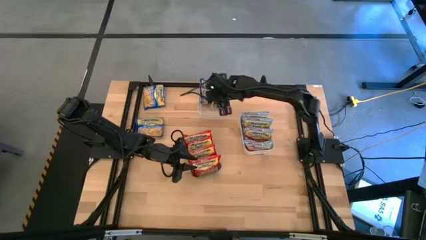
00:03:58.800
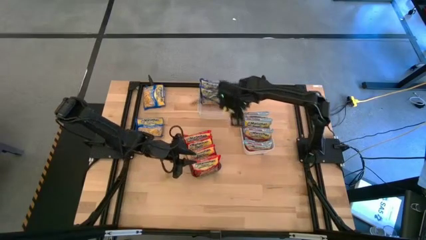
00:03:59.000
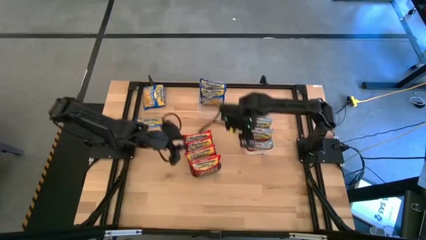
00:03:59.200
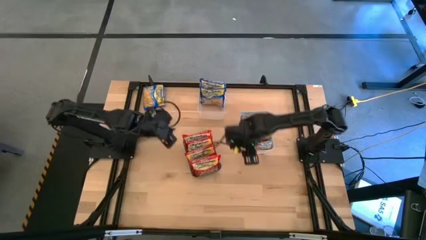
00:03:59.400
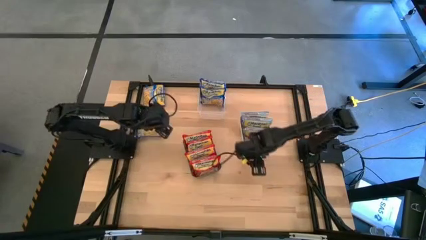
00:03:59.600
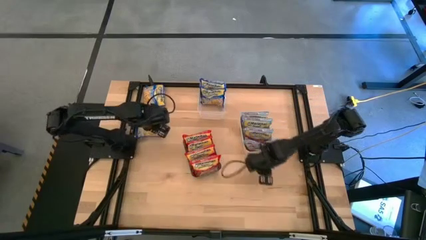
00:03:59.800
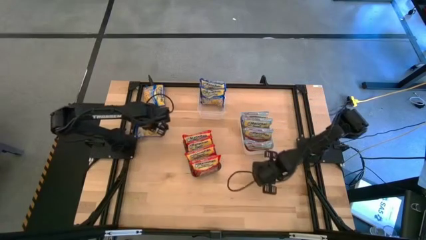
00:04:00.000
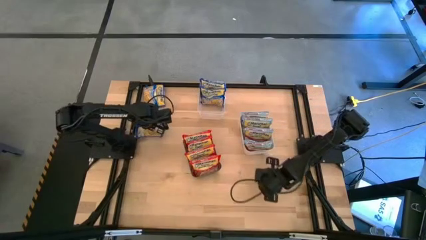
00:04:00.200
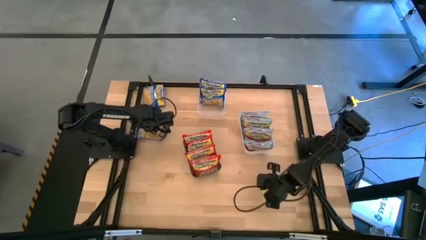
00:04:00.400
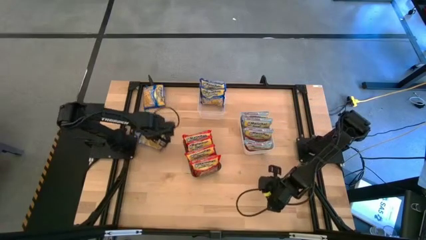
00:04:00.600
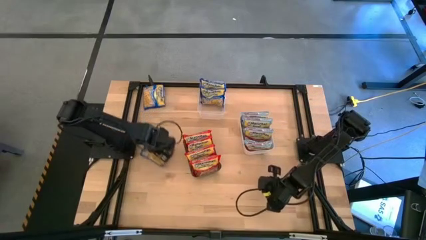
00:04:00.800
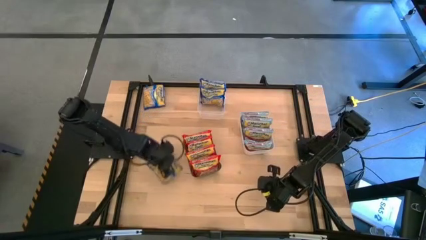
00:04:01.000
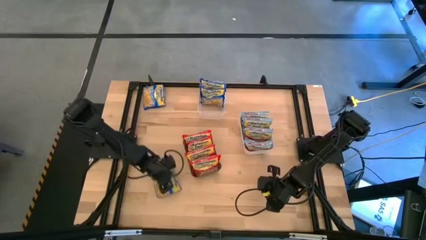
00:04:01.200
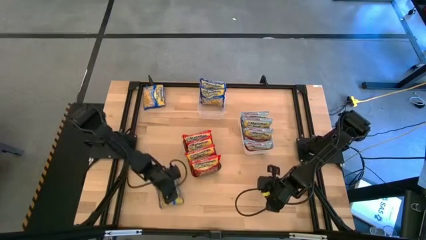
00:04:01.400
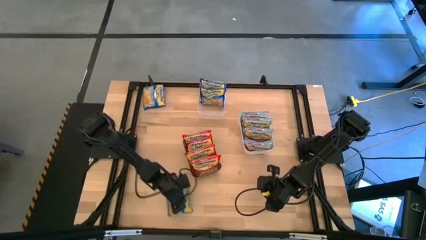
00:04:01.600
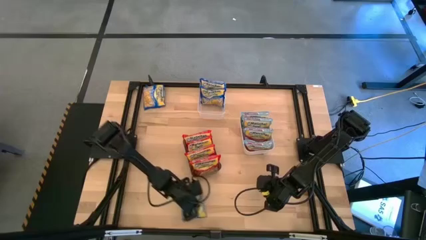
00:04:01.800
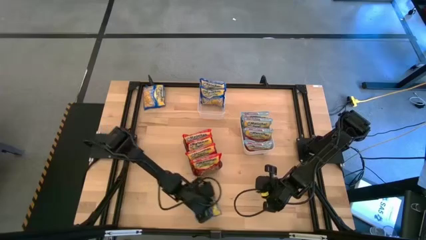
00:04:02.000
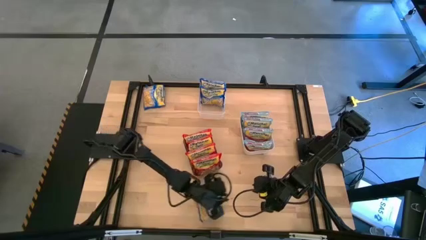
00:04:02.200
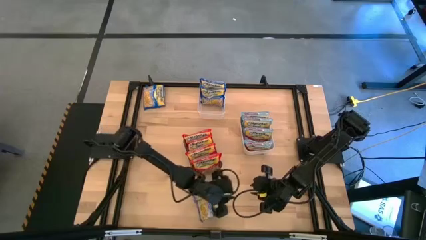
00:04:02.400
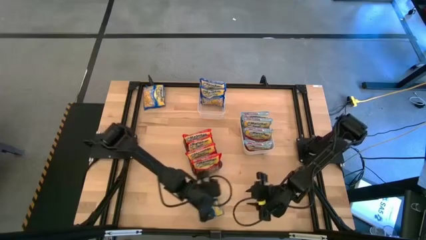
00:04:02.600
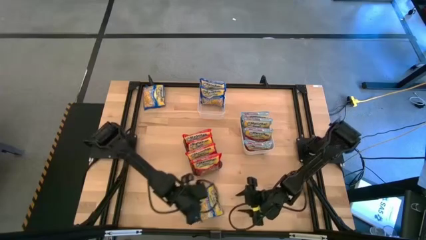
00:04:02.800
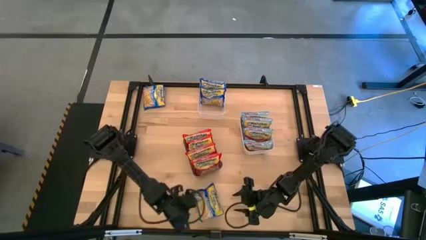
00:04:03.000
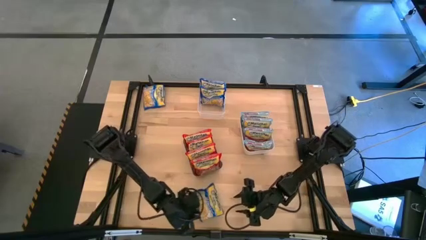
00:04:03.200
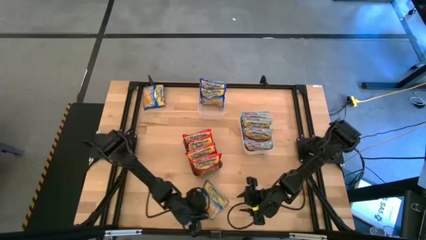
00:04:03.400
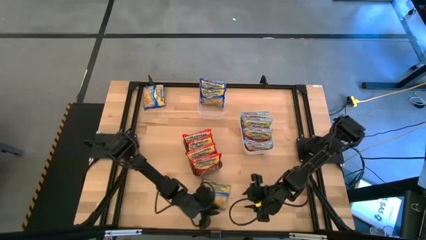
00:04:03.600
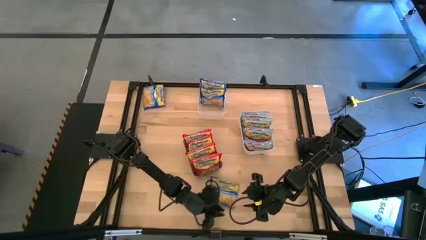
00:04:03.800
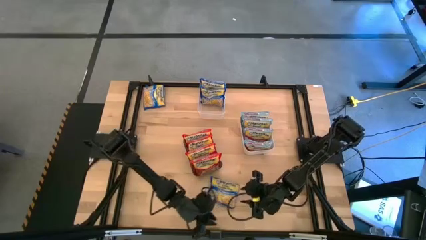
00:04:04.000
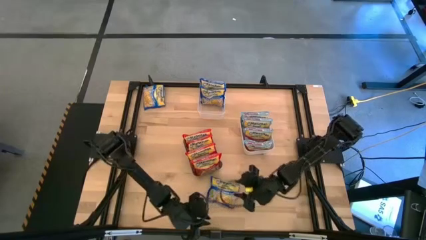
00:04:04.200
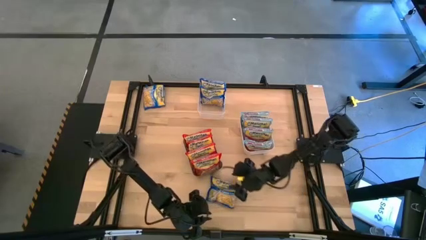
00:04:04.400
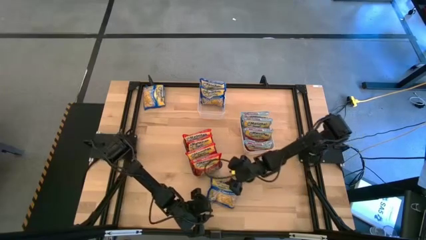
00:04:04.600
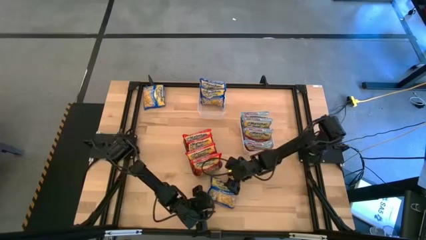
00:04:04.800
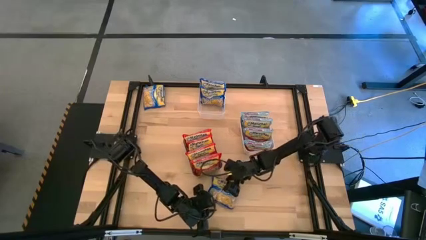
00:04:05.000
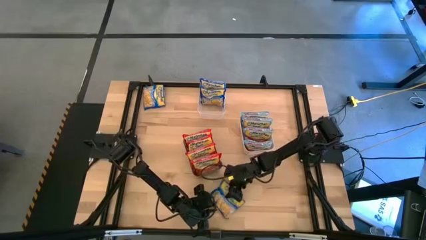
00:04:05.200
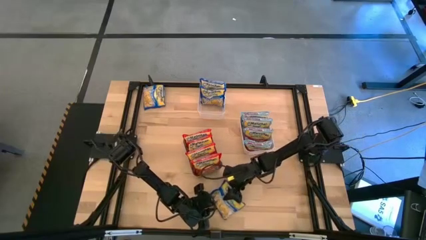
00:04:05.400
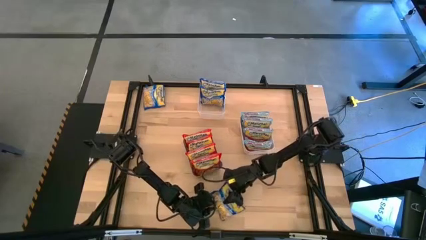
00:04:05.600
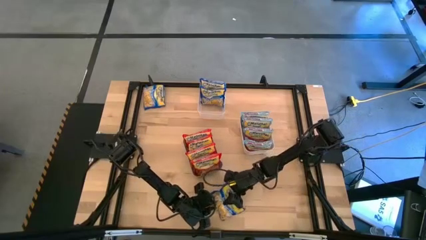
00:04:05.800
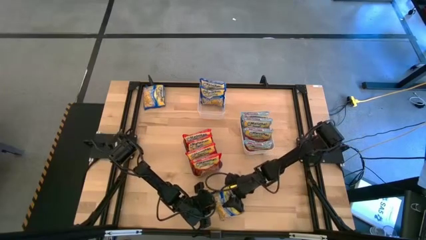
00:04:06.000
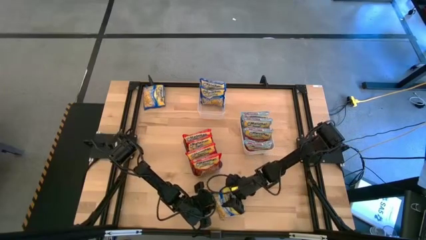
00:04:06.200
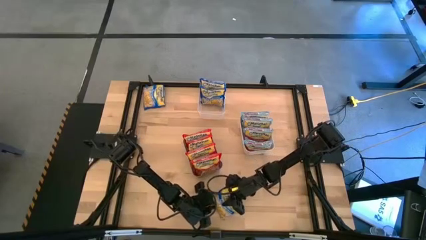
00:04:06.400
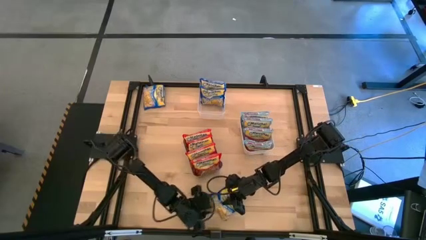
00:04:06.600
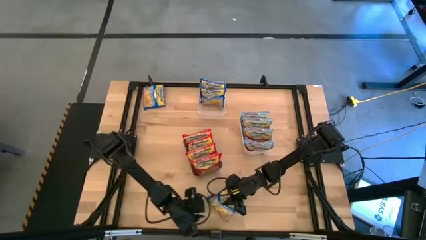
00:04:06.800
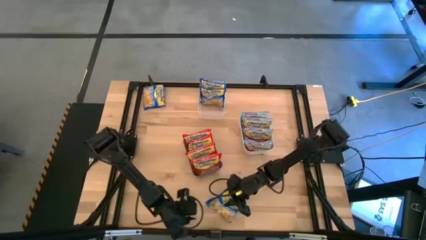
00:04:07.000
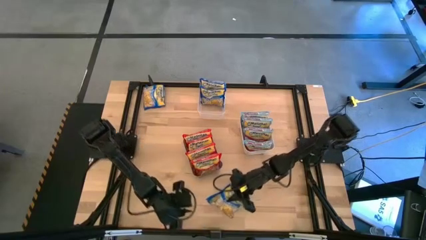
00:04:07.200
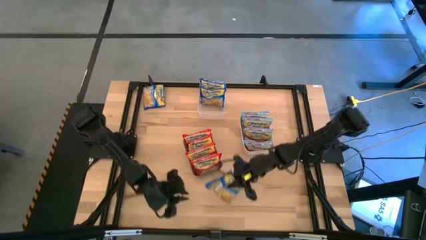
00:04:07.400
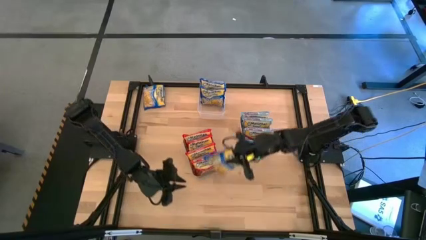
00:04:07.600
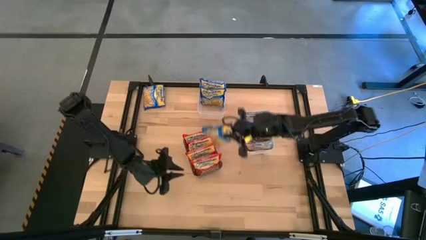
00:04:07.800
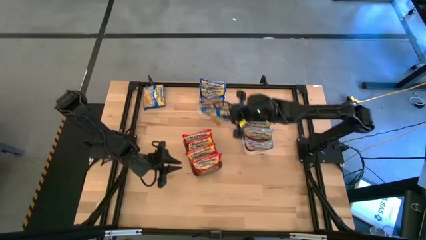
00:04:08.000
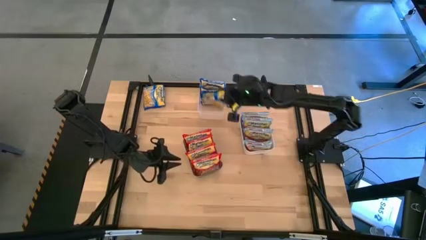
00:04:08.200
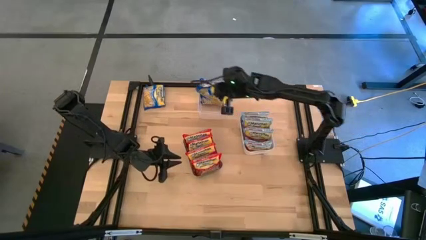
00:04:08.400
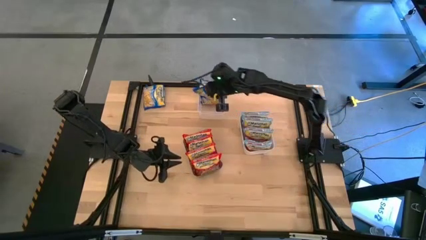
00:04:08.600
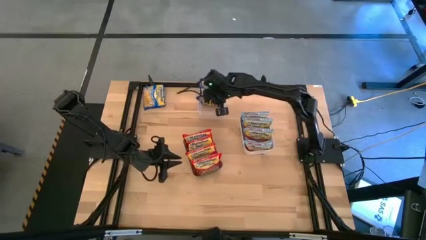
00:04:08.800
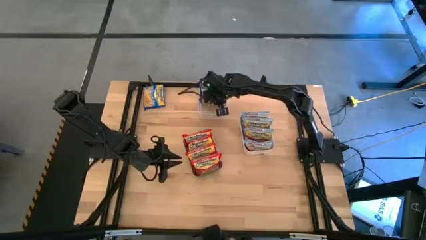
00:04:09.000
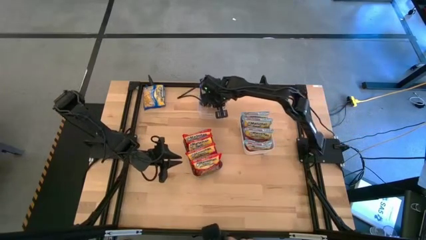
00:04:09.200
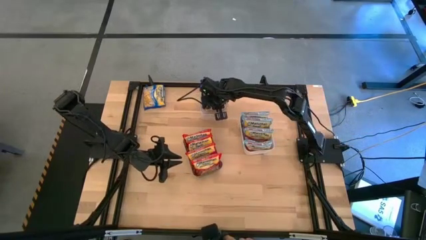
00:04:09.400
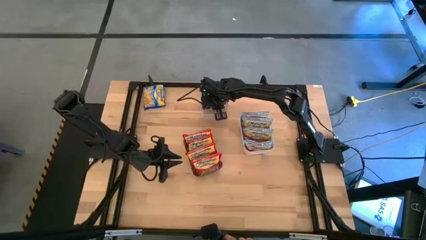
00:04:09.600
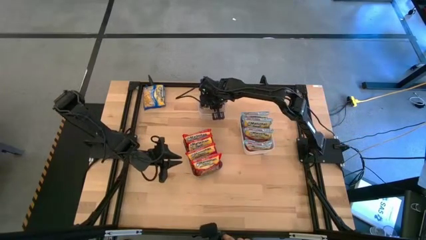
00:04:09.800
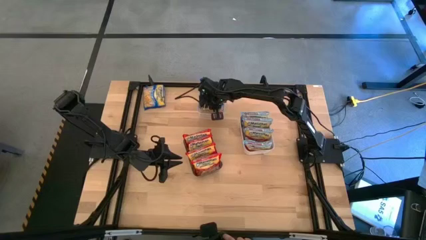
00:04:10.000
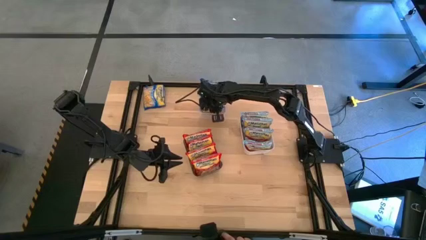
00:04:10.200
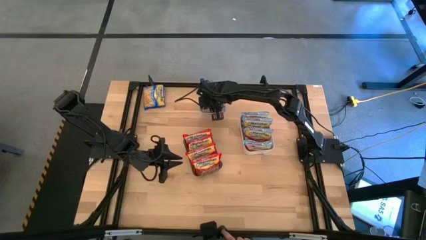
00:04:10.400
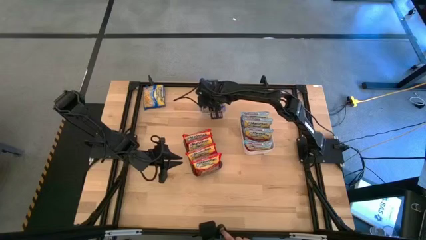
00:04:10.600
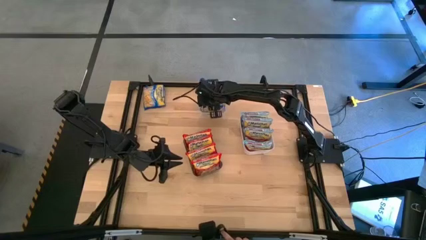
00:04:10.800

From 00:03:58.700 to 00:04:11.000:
Task: Sort Maruchan noodles
Put the blue noodle pack into the transparent bin

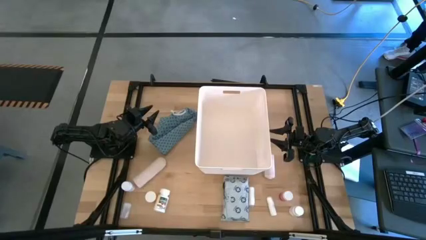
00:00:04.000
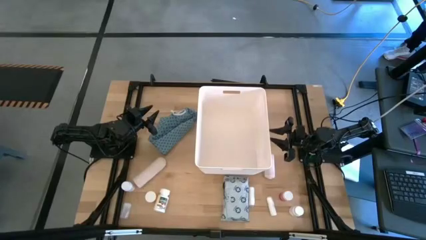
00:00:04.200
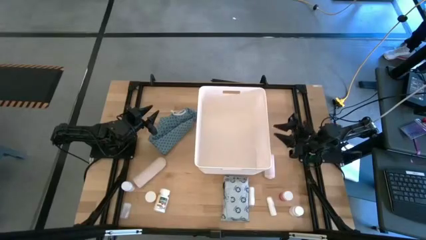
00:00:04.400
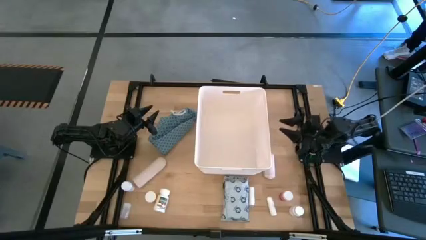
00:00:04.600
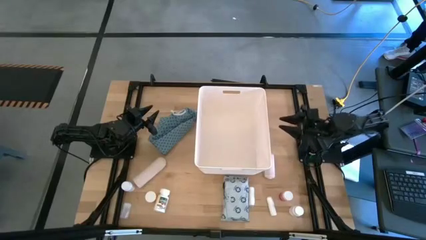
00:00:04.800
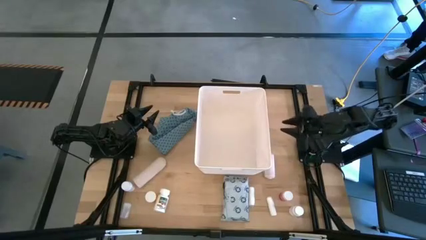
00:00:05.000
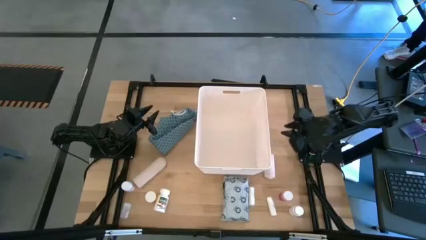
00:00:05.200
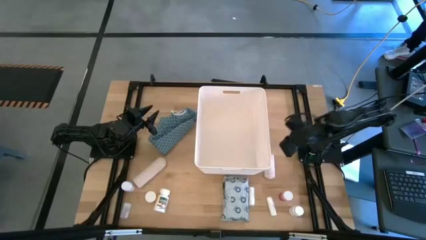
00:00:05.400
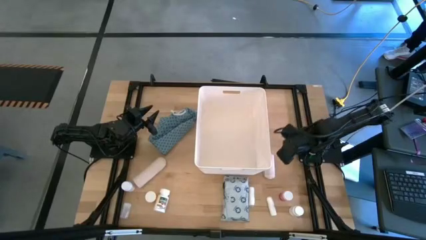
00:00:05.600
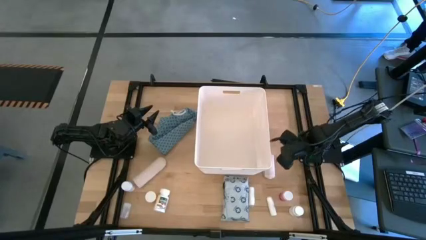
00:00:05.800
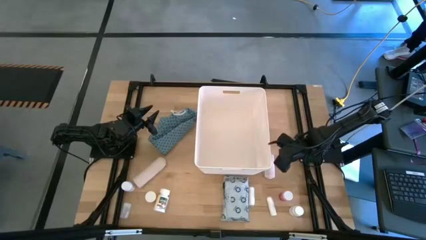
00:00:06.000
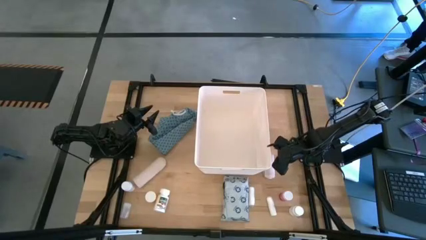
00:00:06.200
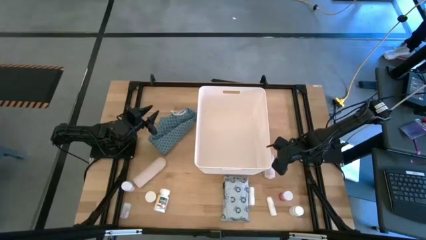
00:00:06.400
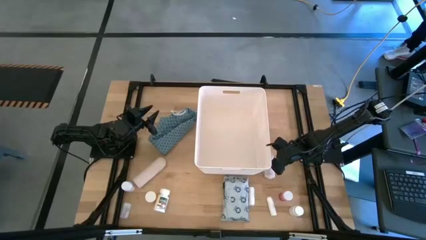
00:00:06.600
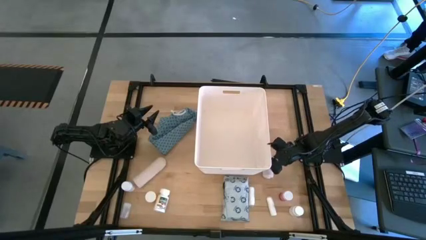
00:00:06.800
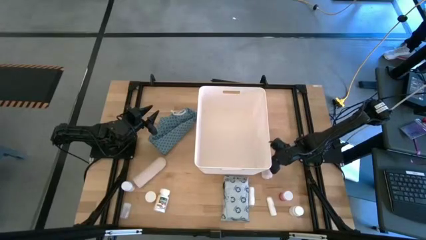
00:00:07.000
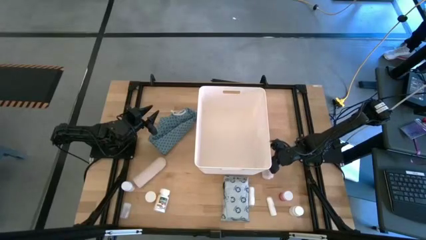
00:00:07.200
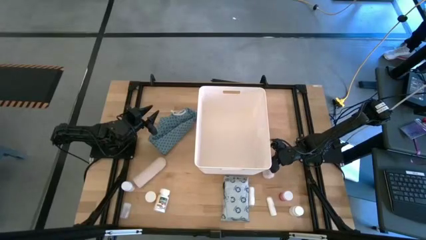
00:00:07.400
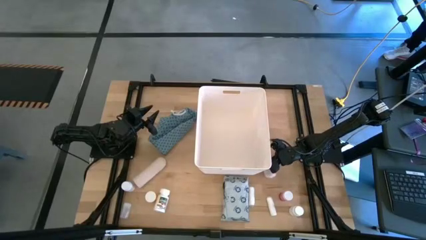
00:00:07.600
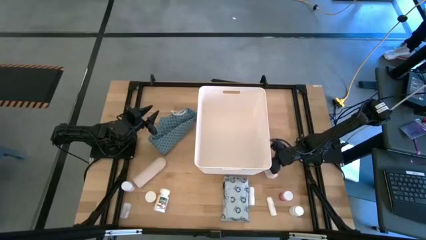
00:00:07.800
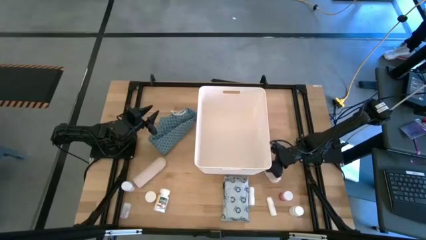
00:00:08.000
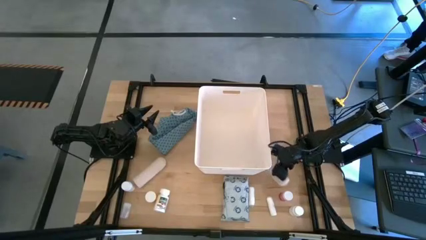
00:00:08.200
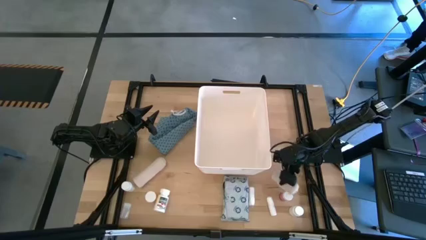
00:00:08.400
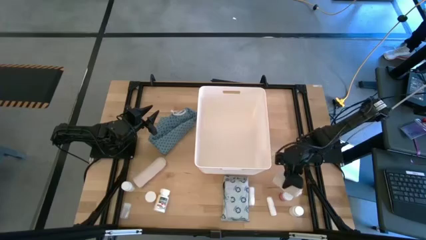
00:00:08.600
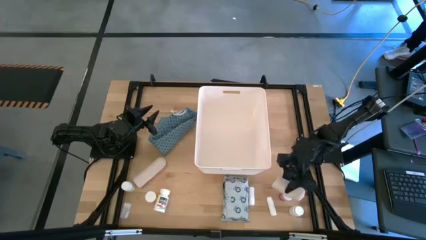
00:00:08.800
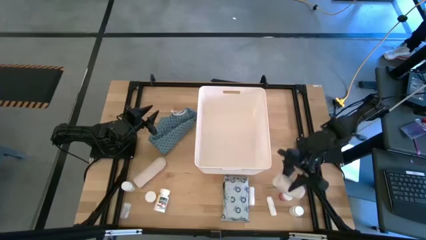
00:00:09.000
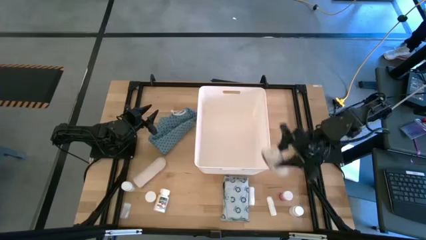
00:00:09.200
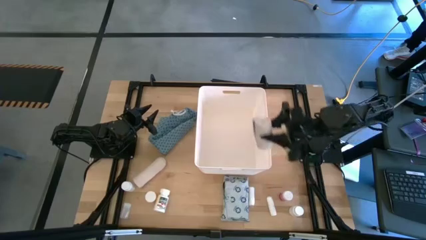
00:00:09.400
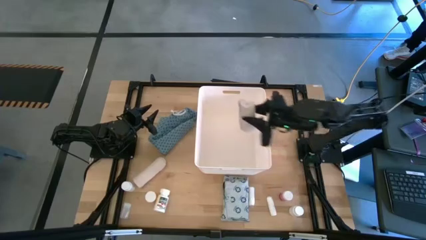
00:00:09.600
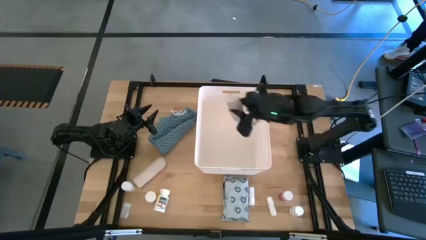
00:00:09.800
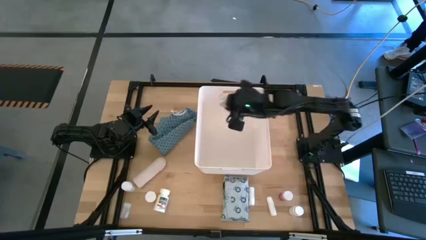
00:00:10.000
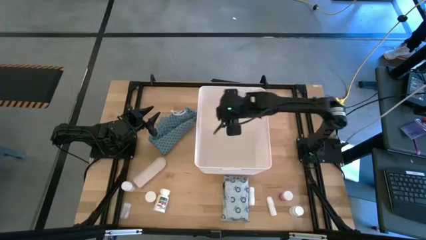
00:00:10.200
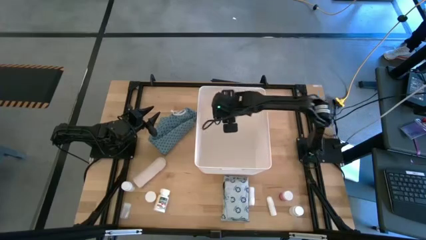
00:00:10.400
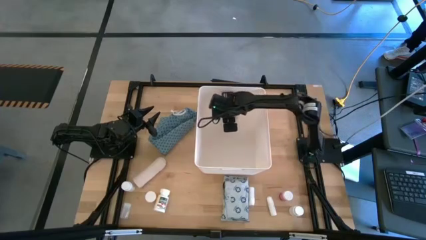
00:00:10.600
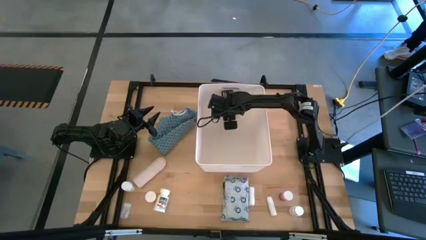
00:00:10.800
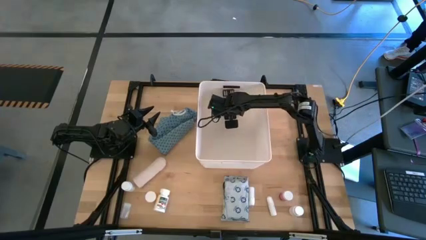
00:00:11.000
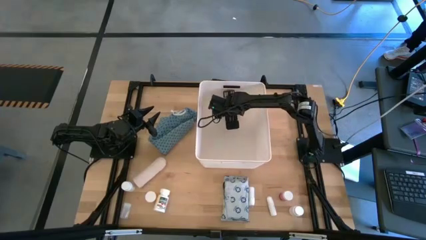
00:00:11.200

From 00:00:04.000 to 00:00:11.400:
Task: Pick & place medical supplies in basket/bin
Put the right white bandage into the white bin
